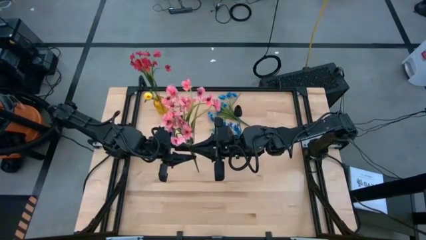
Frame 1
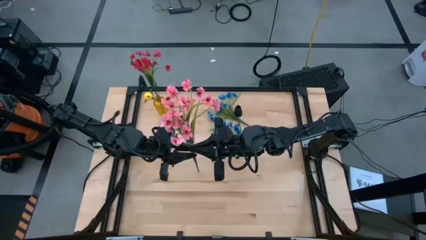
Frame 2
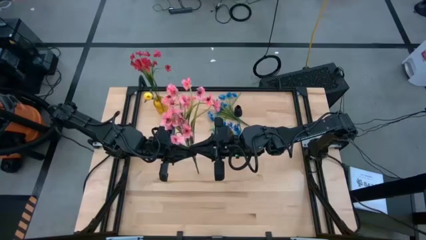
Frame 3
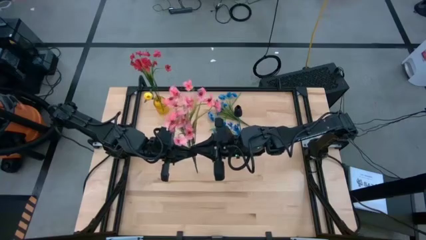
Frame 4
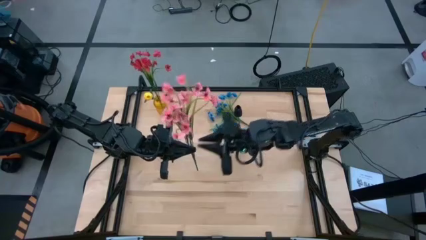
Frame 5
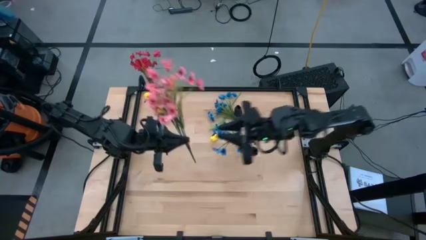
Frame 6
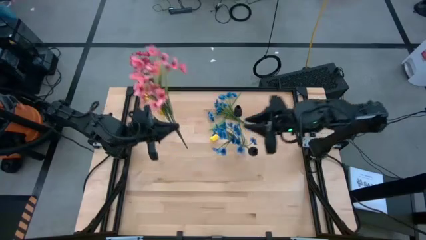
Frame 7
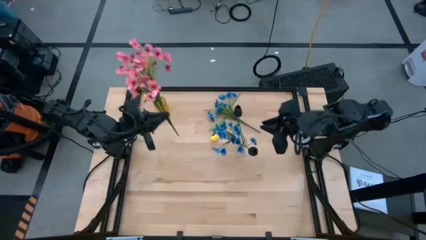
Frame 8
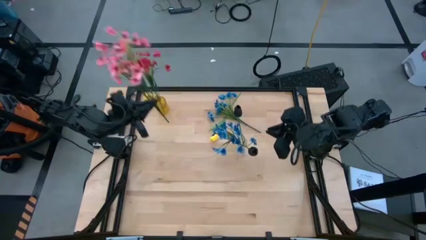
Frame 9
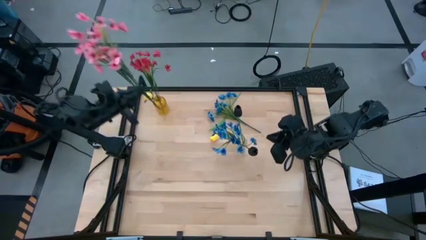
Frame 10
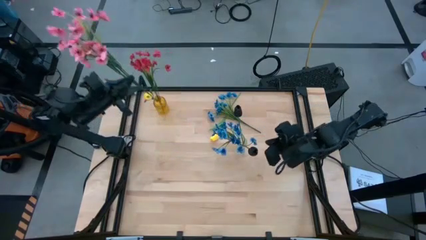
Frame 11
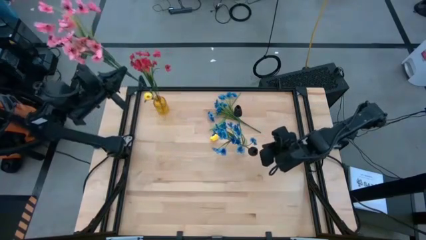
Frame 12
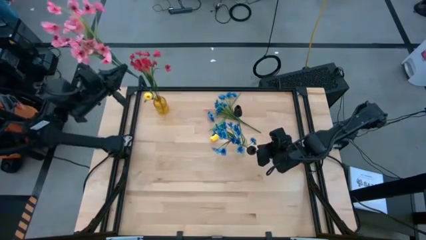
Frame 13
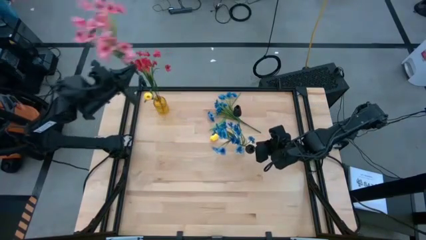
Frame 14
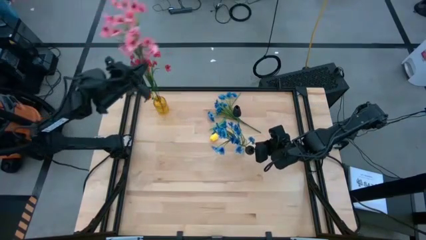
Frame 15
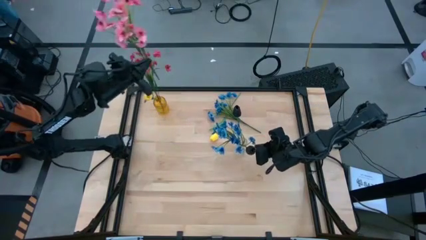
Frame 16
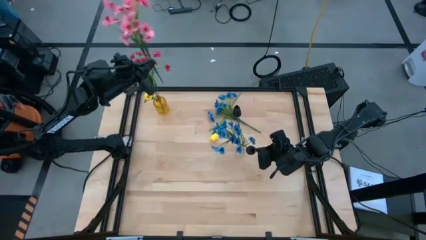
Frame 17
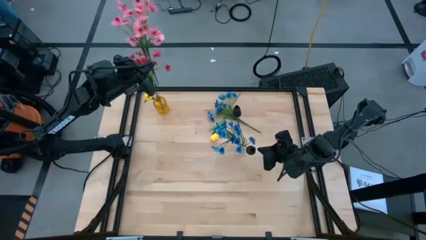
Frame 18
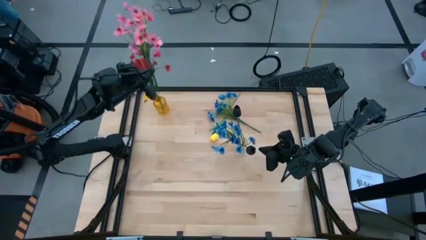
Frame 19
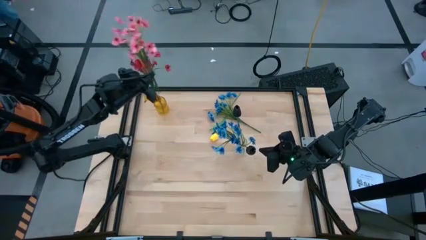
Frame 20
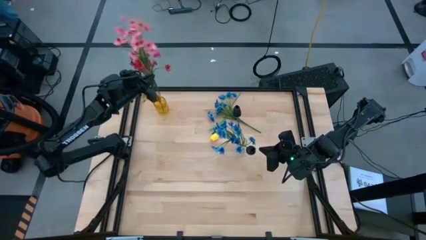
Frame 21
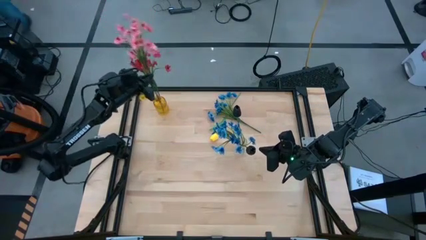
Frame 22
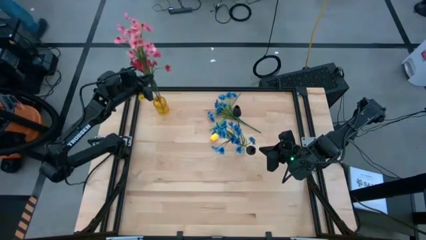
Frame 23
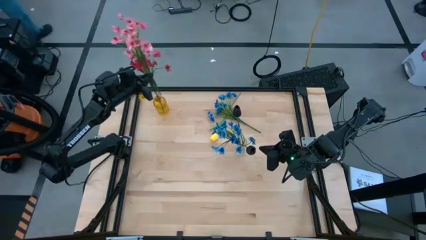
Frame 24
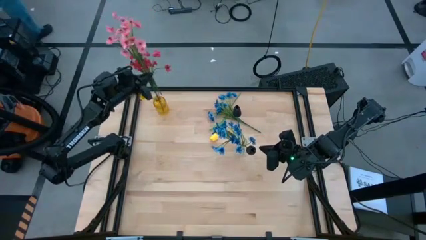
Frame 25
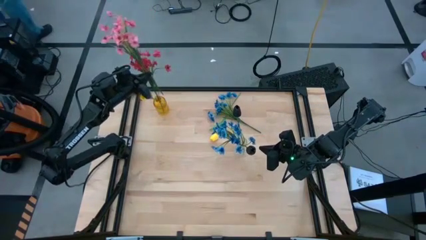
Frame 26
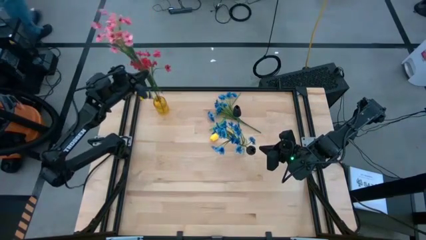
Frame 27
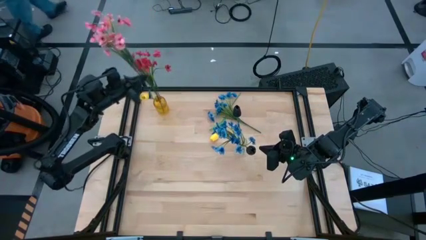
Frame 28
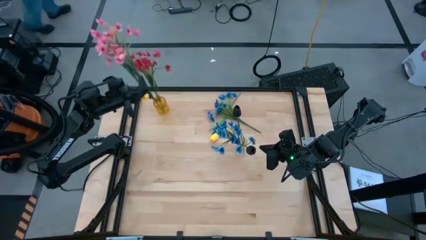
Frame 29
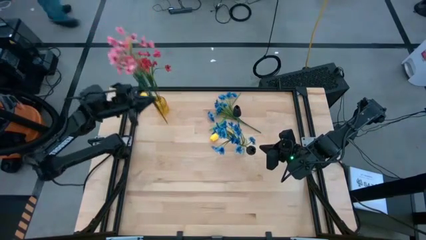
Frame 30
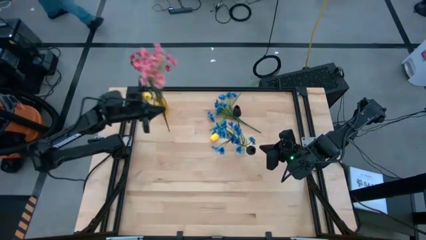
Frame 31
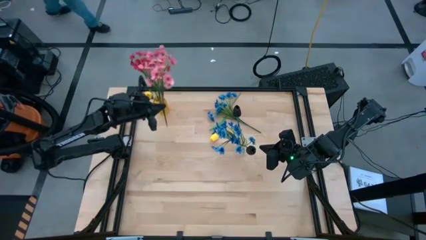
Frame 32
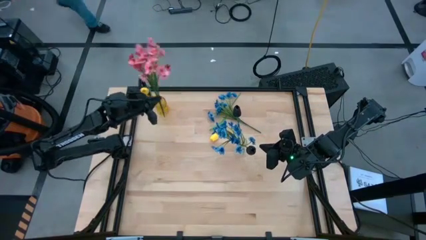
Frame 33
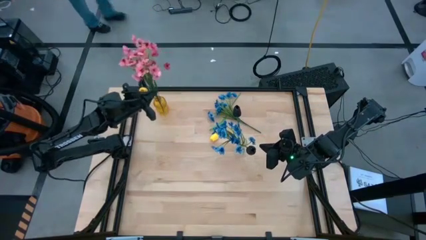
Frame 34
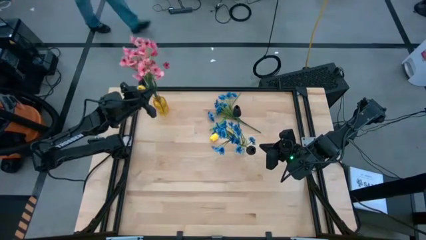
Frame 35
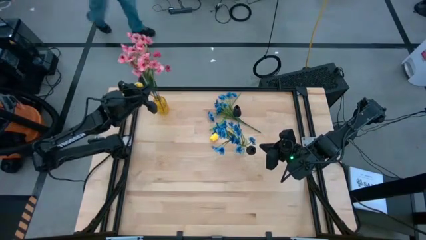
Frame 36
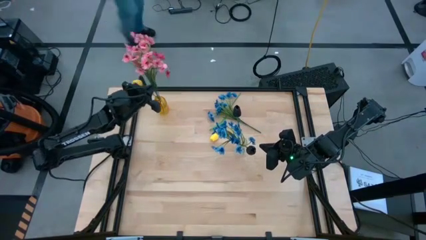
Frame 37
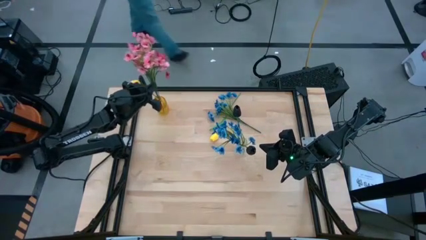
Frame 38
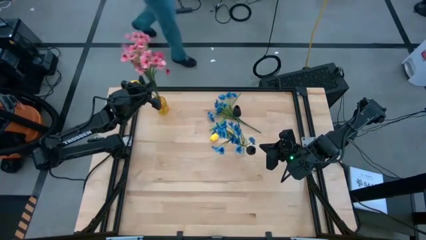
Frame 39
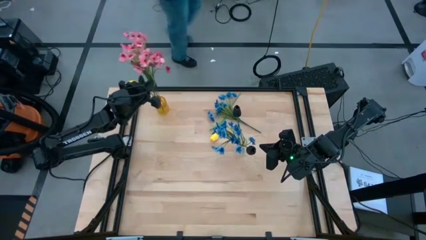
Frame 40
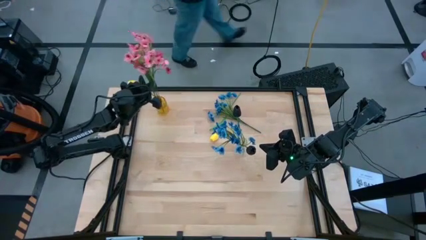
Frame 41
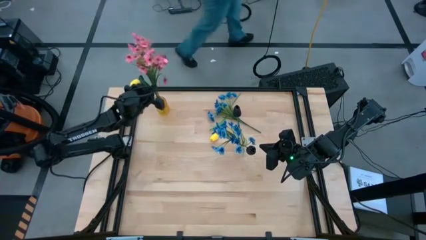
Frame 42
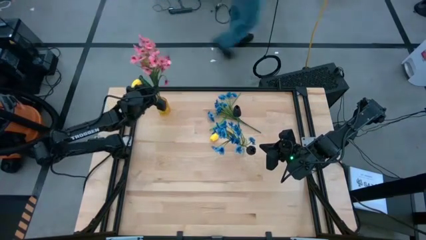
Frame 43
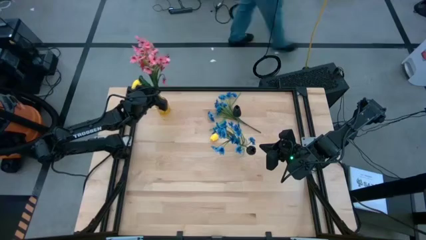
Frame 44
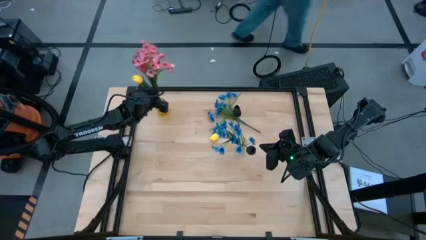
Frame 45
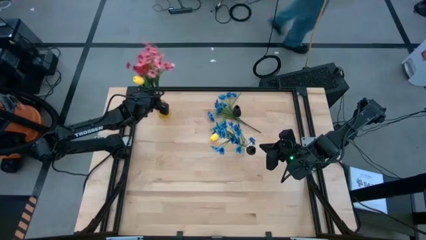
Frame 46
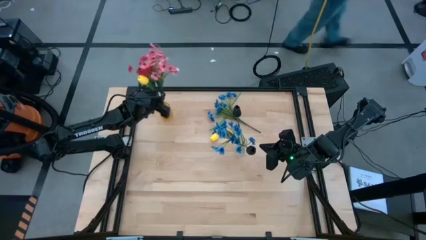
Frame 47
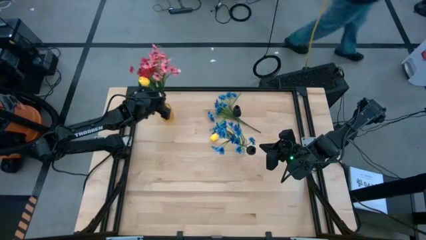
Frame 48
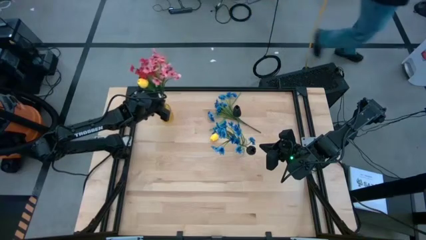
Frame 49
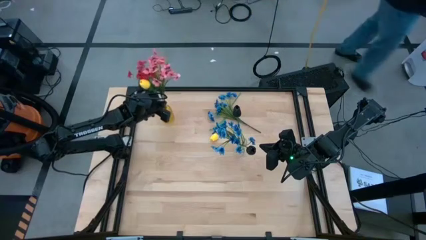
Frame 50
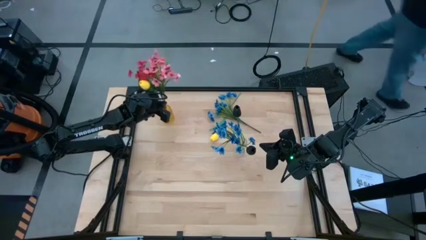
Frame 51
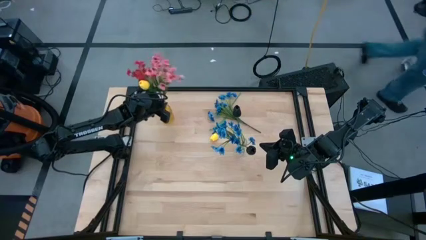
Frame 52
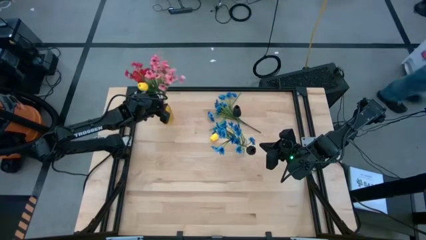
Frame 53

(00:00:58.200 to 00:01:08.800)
Task: Sort flowers into vase by color
Put the pink flowers into the yellow vase

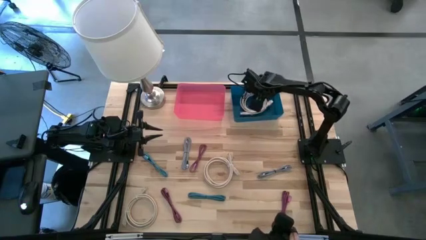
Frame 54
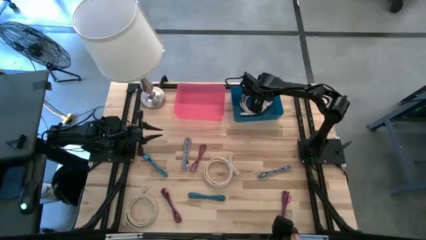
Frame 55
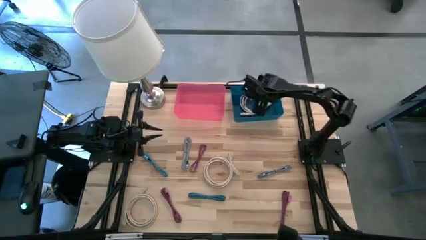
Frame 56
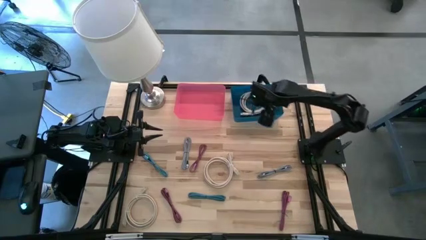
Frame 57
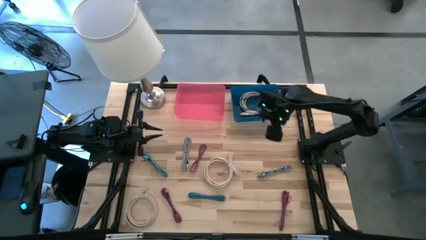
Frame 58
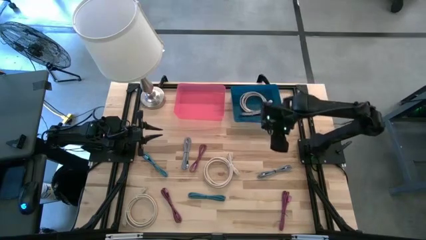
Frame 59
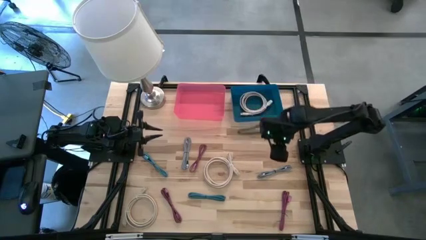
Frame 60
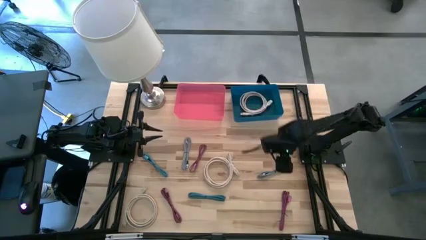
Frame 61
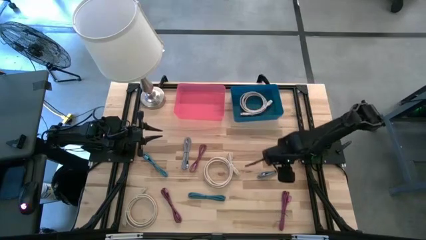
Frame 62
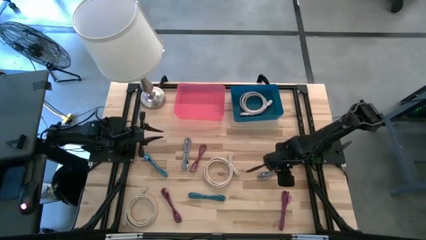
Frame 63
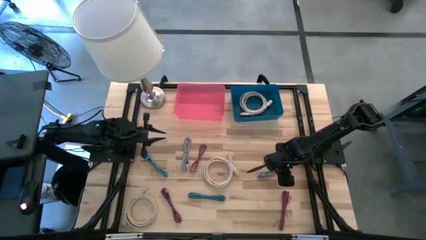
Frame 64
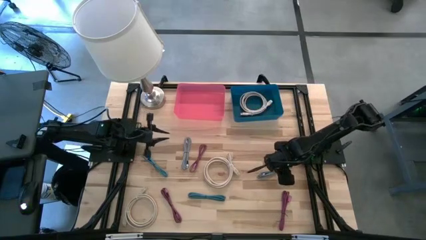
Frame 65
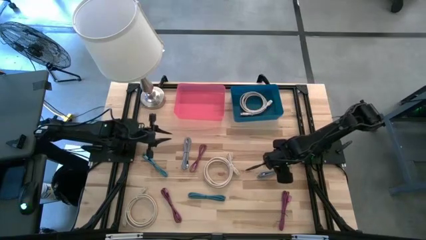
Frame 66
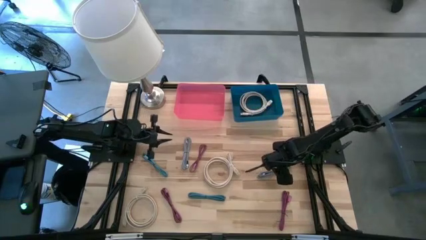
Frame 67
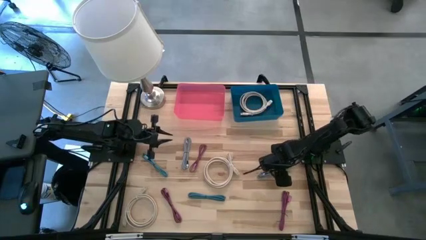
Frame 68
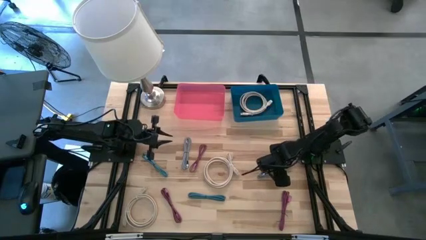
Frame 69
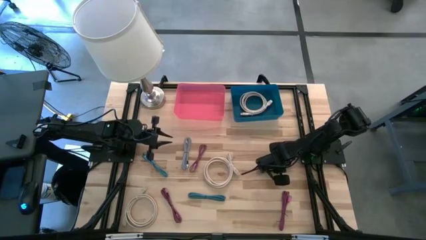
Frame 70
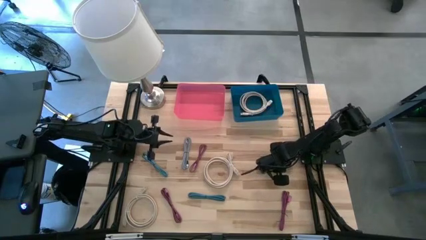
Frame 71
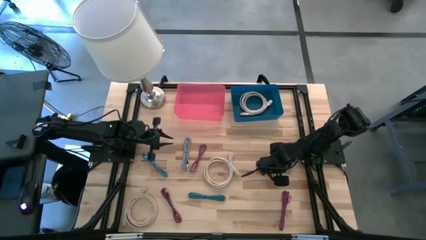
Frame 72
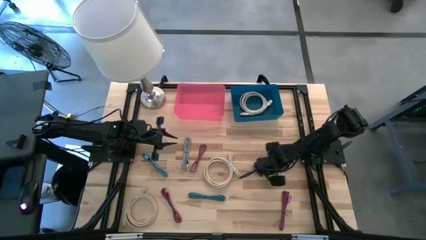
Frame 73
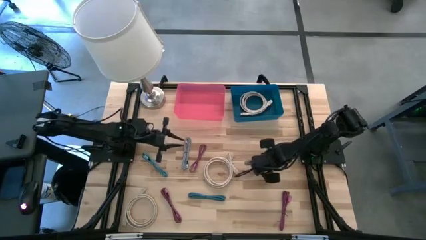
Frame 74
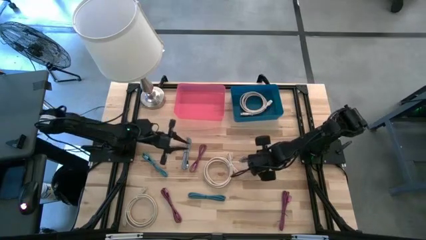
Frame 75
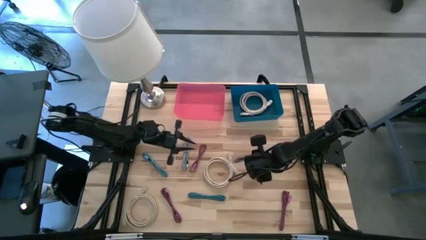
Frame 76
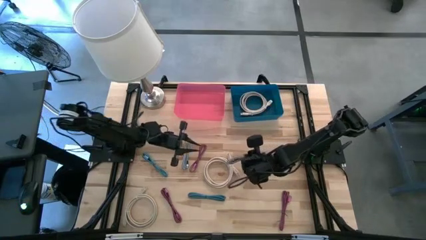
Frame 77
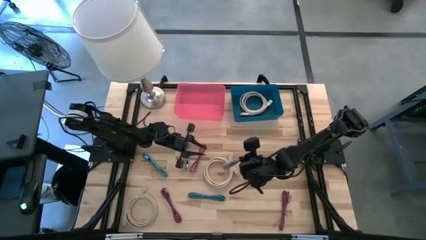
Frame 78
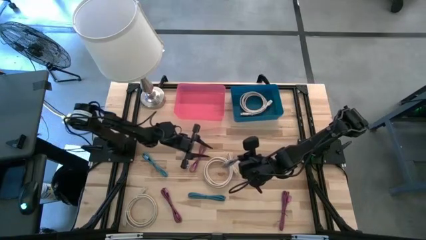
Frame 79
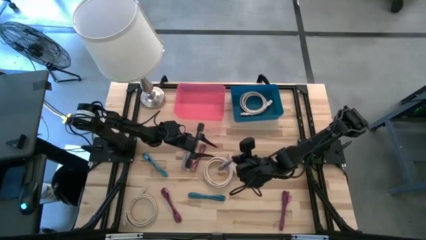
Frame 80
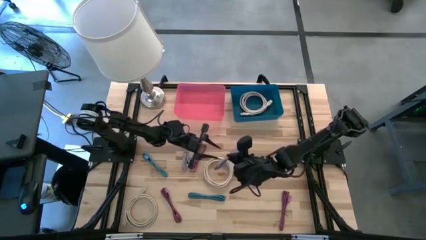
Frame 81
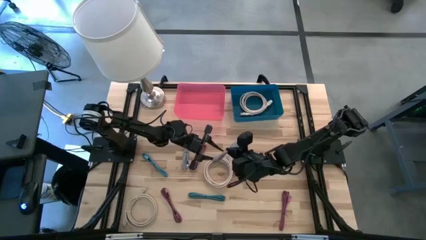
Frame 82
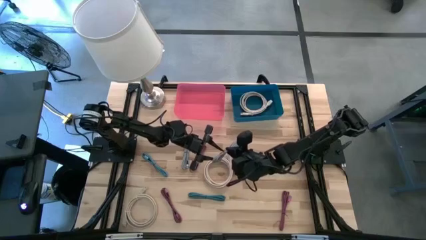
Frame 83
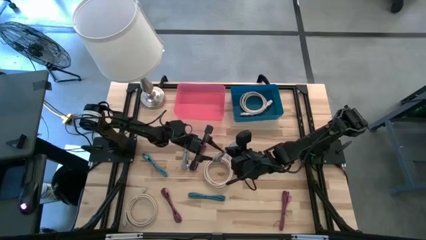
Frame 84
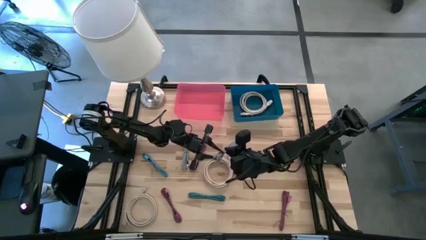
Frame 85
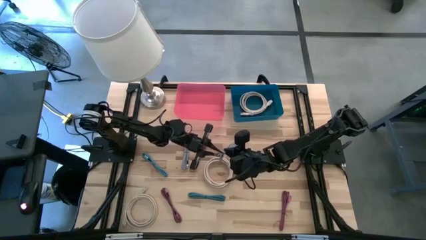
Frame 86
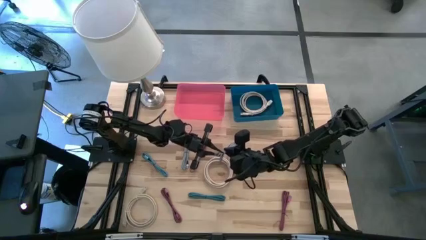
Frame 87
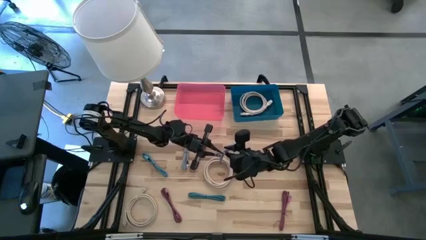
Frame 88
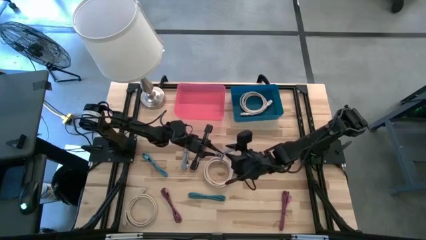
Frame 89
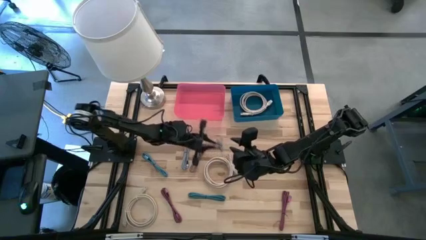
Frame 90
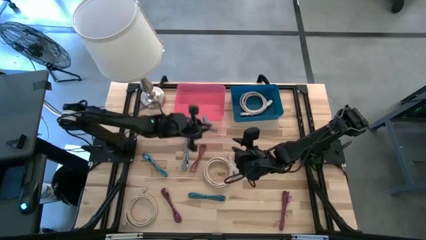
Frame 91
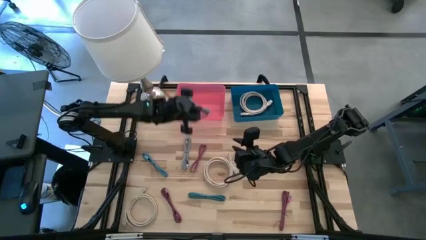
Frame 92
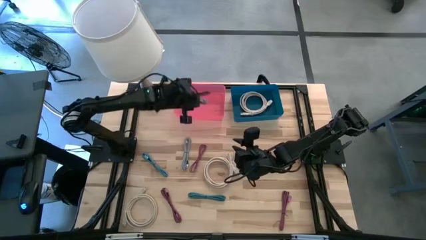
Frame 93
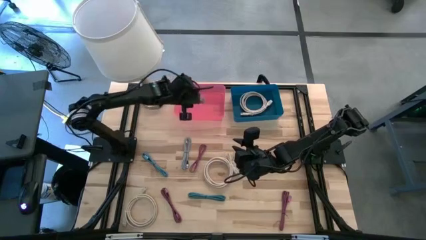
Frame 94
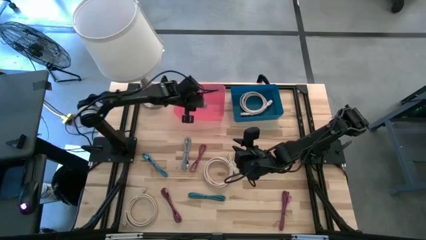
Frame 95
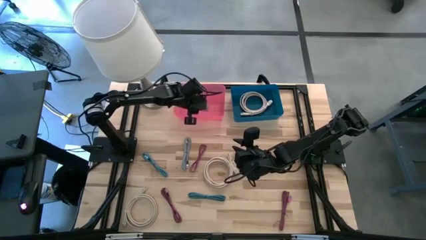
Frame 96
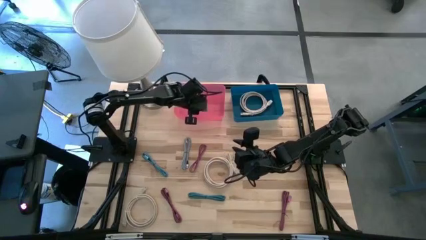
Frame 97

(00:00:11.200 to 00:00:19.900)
Task: Pick & Place USB Port
Put the right black and white charger cable into the red bin
